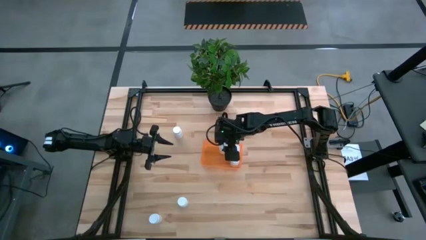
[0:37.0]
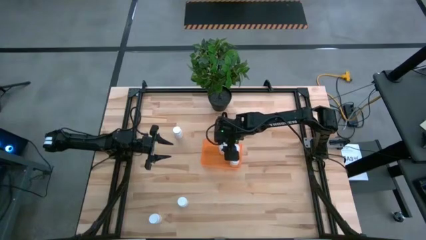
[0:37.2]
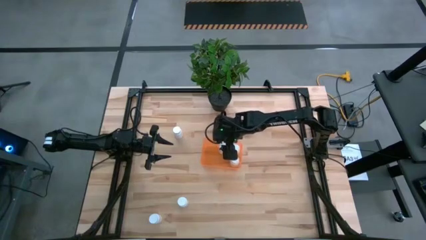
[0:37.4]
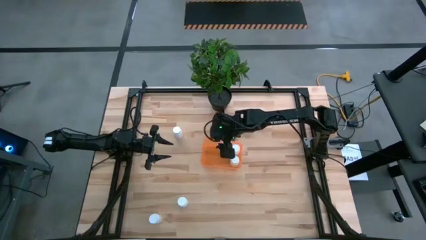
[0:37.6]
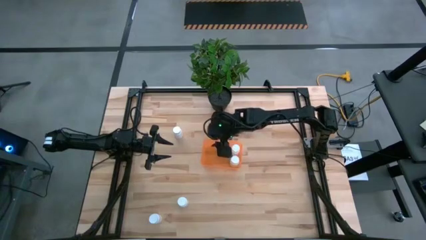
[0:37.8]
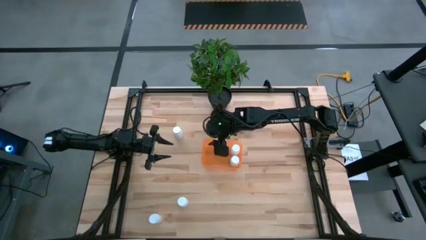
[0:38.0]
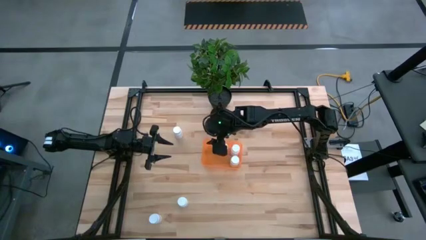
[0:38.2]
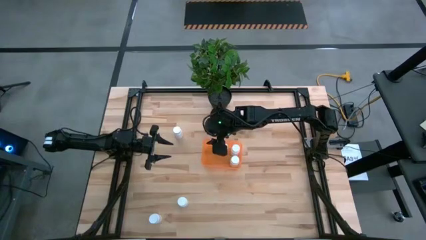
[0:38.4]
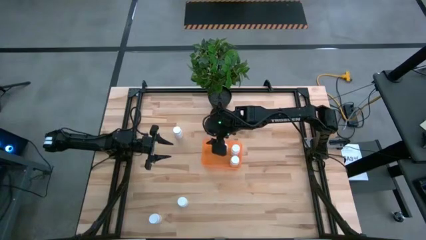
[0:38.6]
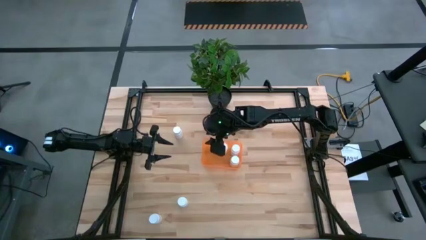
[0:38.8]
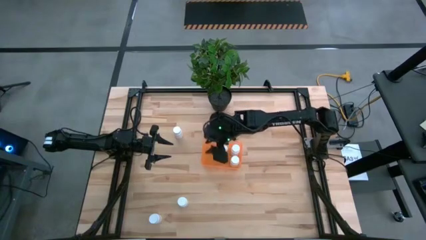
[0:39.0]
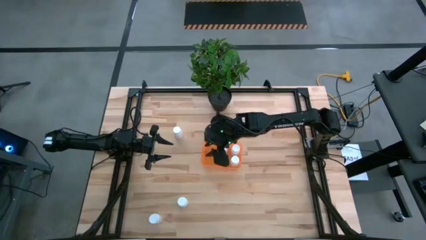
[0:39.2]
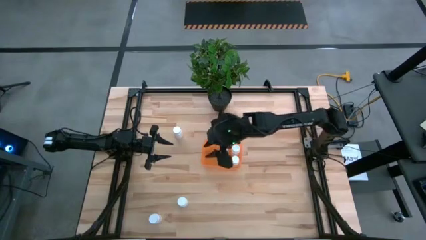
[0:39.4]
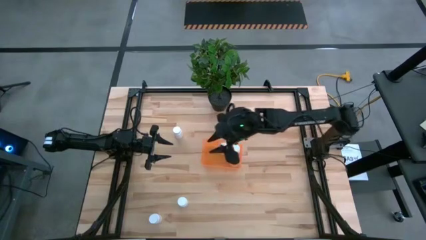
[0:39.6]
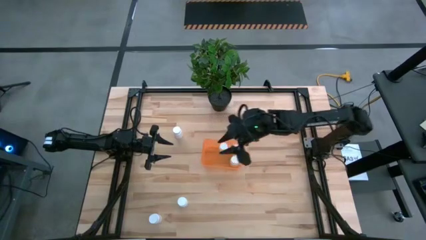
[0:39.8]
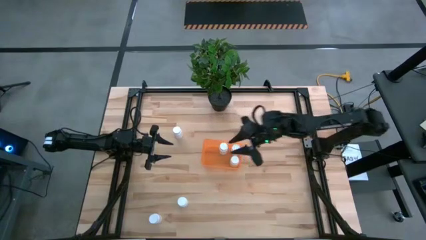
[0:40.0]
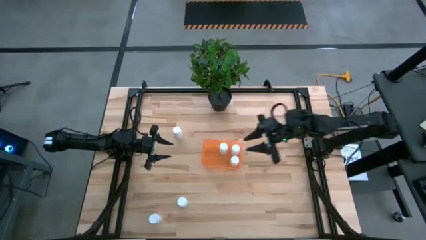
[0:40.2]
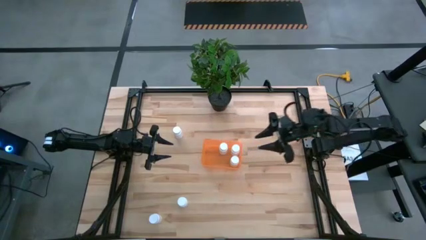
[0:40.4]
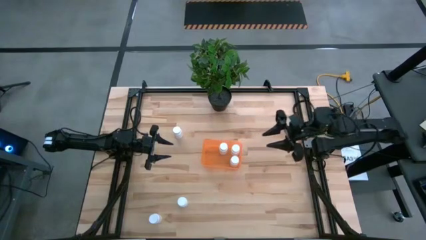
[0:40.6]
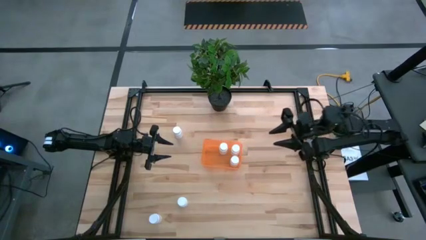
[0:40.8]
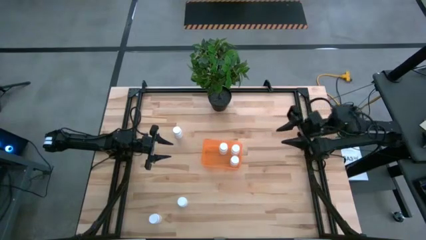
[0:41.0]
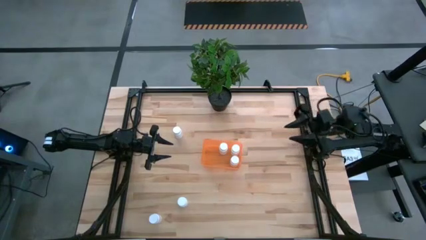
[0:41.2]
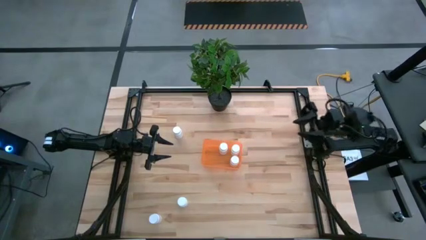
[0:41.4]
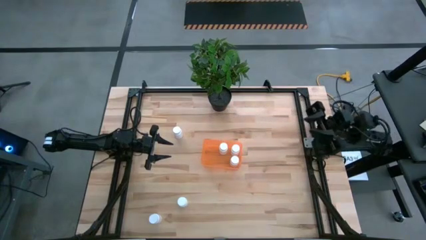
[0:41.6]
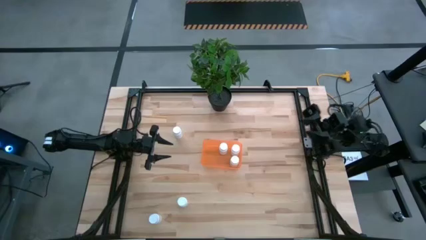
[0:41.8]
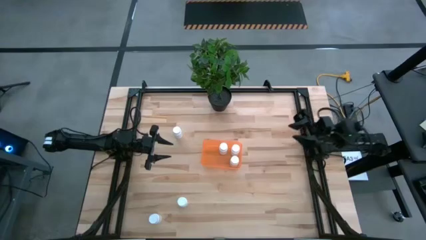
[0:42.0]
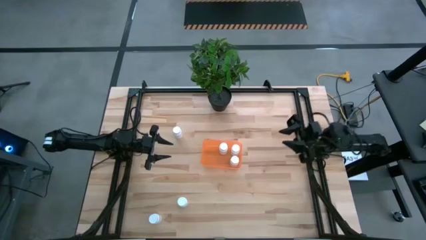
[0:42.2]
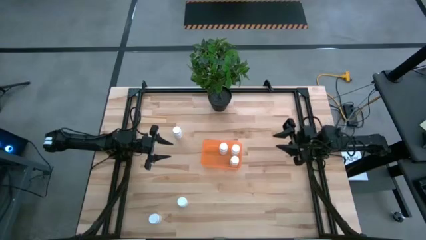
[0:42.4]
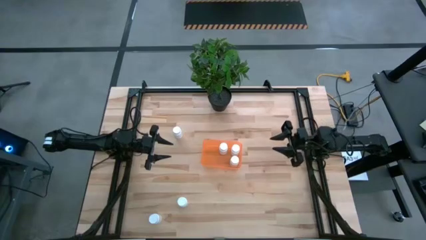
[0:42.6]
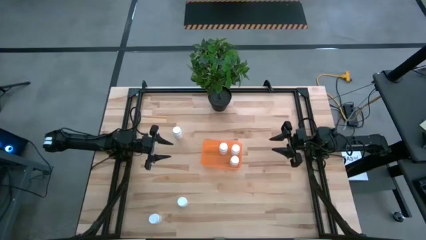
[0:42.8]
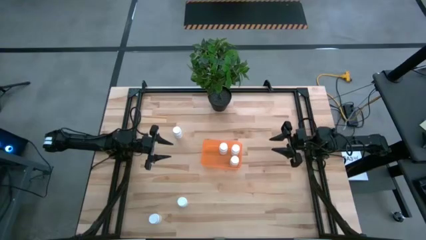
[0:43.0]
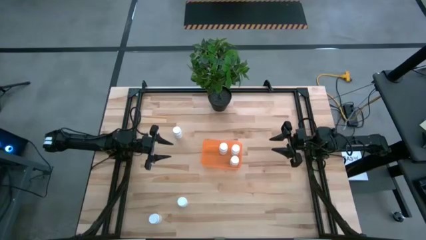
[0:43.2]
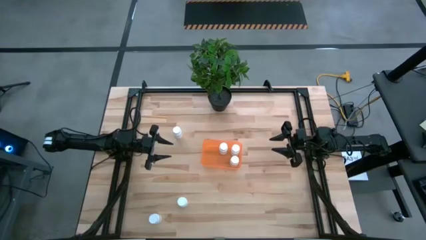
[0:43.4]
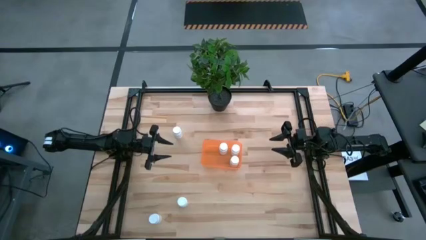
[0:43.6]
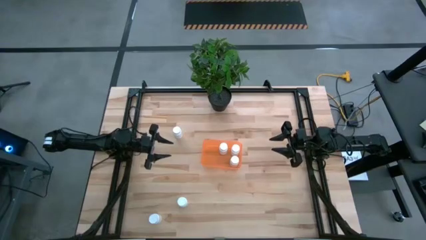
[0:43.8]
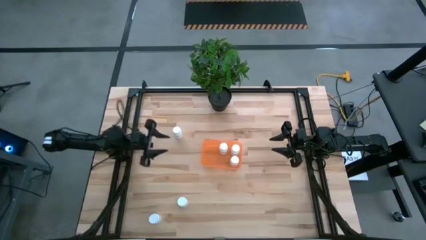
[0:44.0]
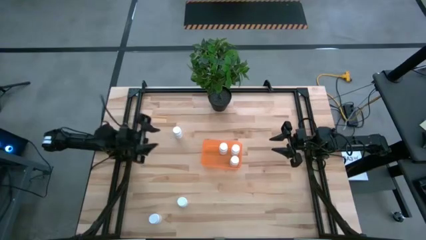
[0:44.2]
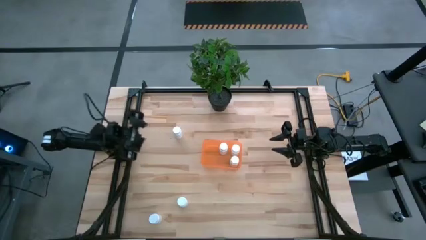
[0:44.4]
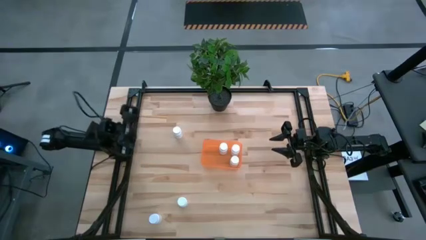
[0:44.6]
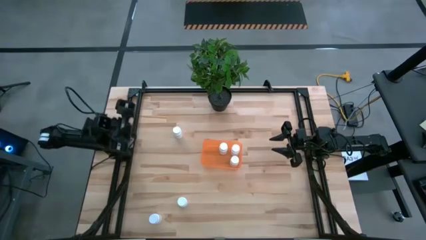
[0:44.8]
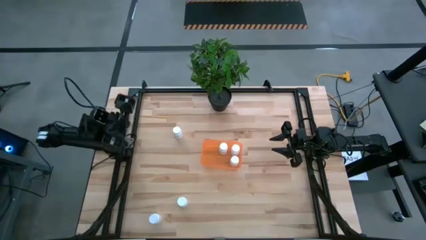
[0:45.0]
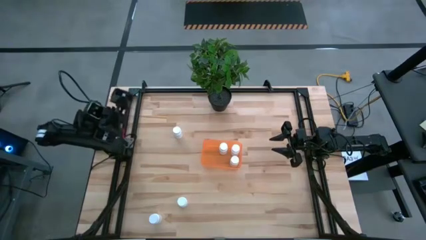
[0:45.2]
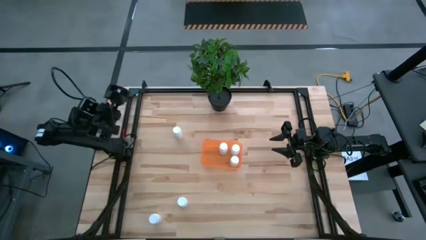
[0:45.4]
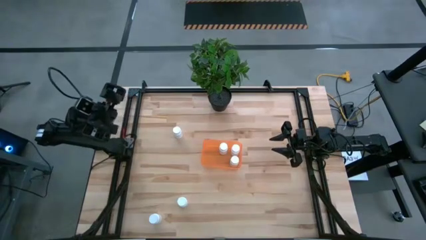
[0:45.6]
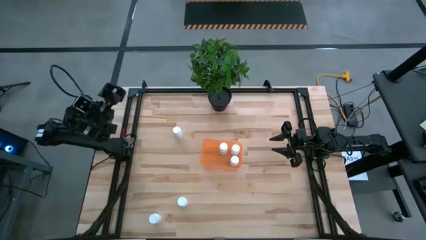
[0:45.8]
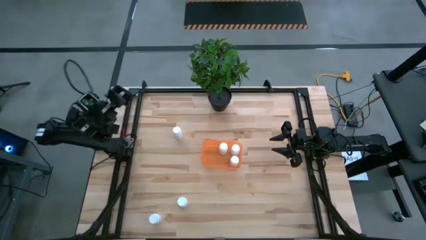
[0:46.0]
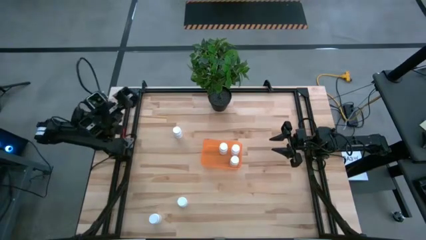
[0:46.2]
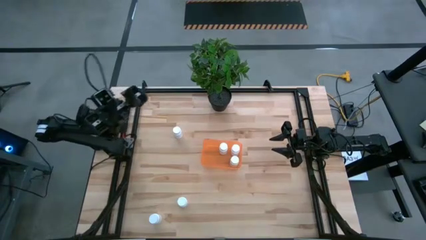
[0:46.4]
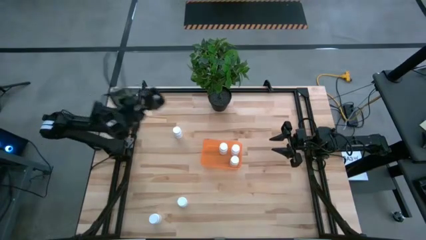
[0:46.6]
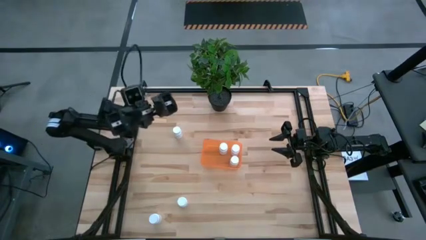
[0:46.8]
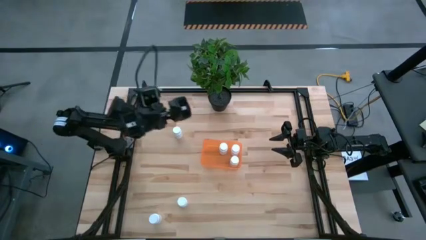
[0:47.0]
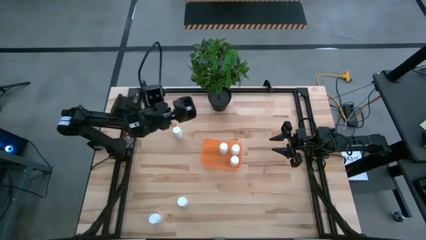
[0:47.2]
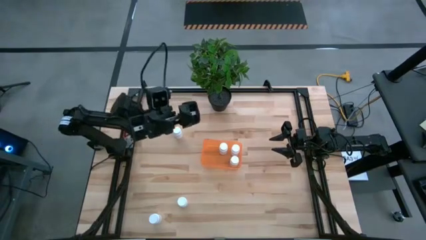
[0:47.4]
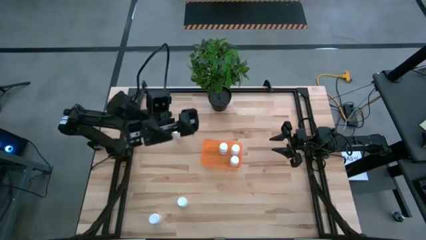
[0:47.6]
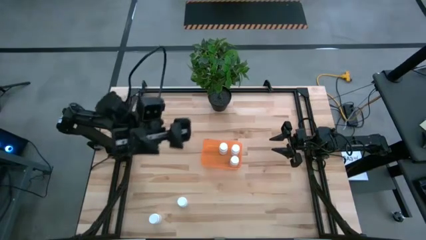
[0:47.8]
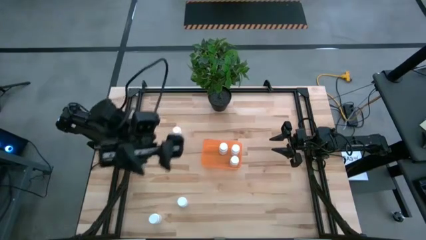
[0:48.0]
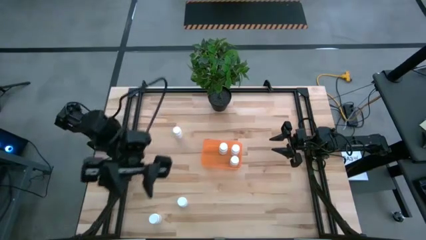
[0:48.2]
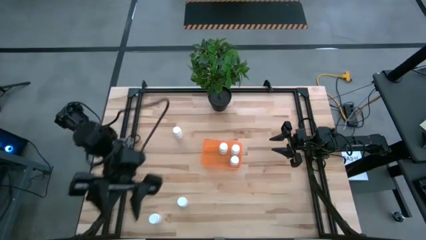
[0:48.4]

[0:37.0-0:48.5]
Task: Pick and place pill bottles into a basket
Put the white pill bottle into the orange bin
